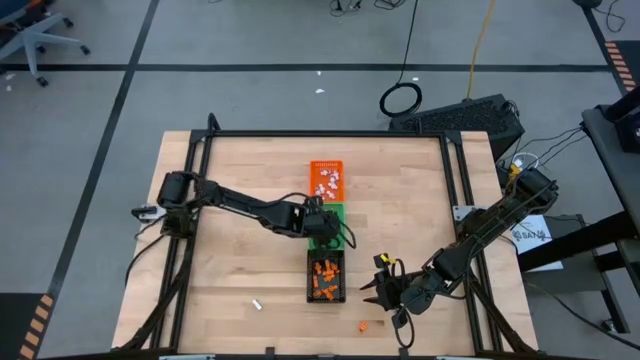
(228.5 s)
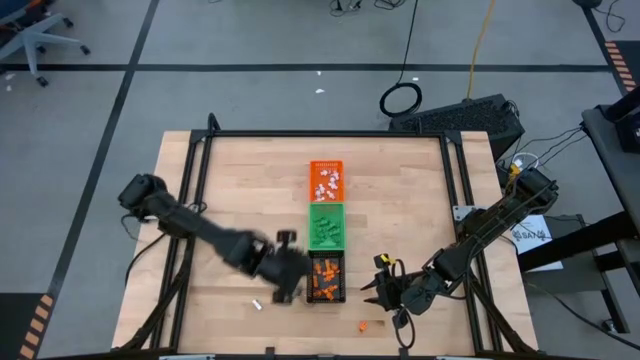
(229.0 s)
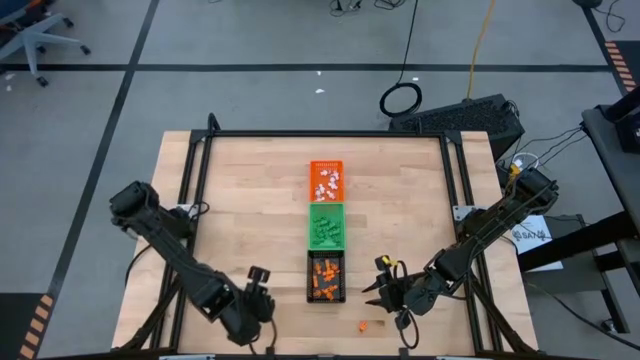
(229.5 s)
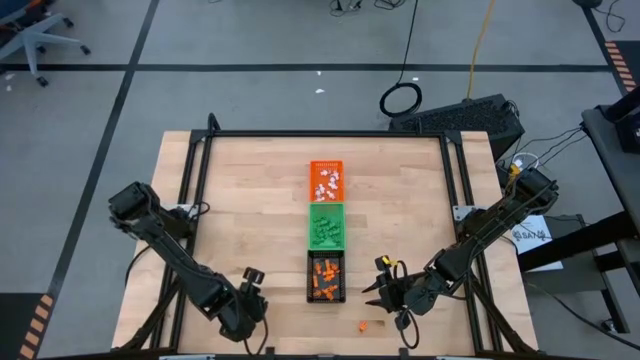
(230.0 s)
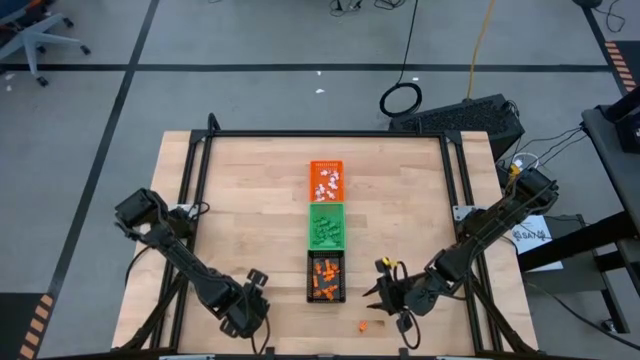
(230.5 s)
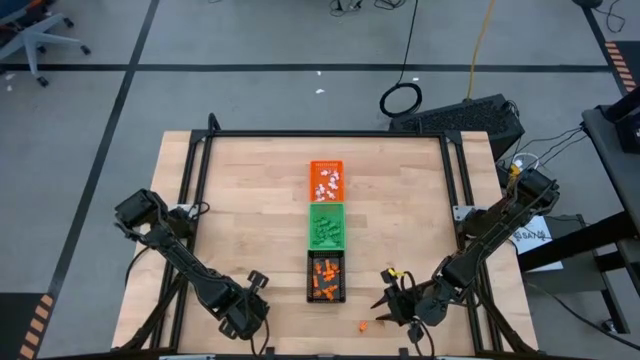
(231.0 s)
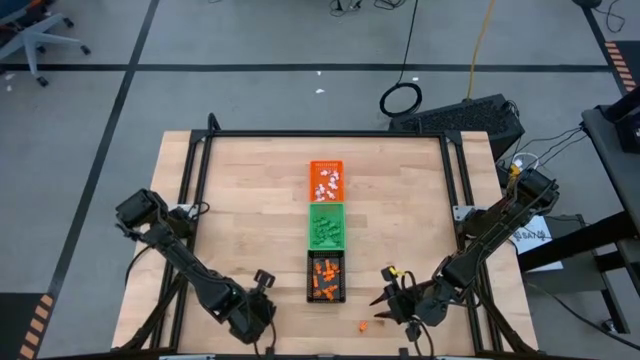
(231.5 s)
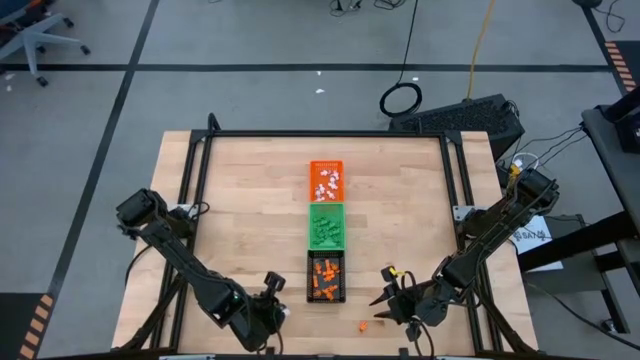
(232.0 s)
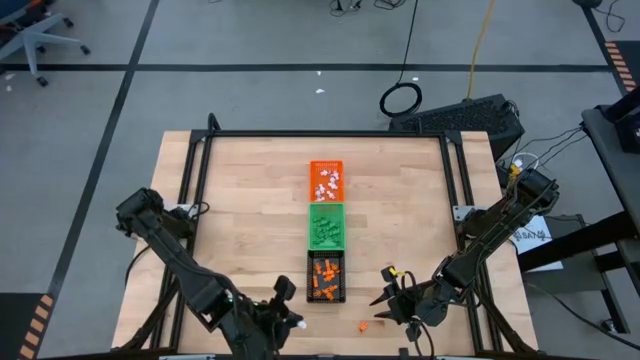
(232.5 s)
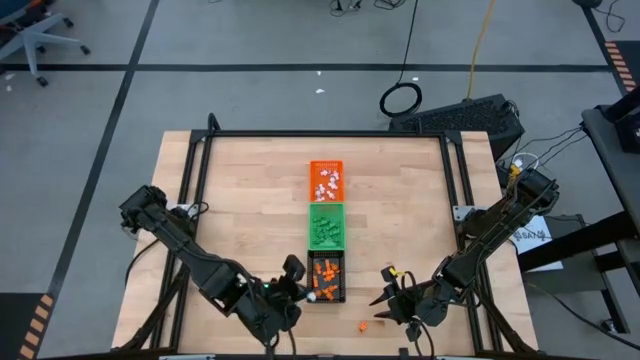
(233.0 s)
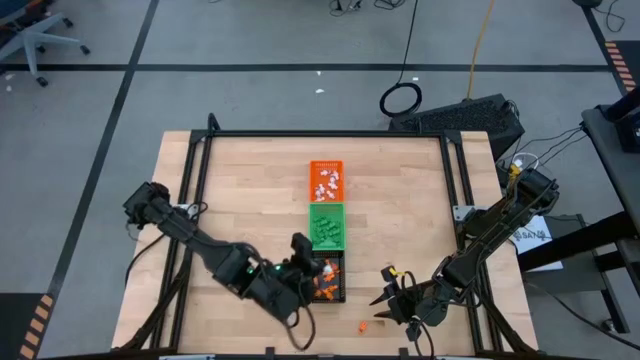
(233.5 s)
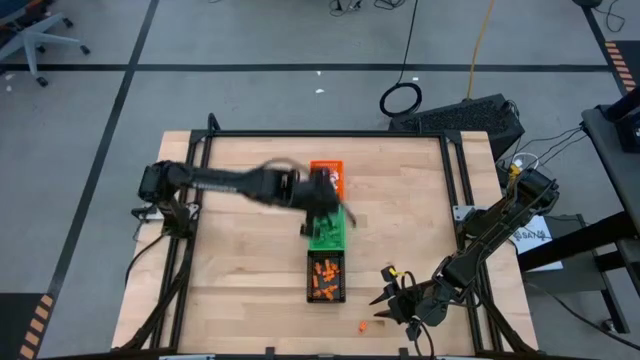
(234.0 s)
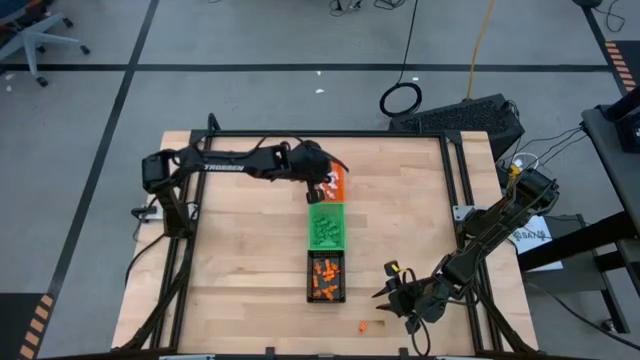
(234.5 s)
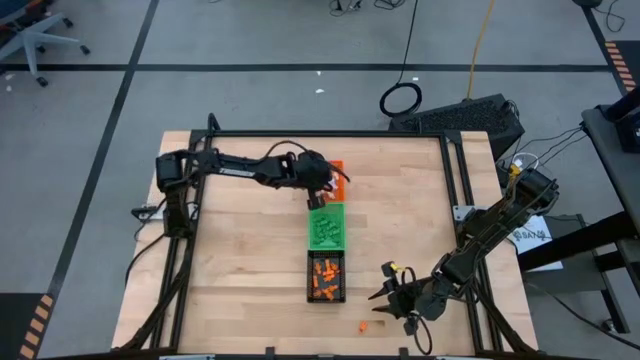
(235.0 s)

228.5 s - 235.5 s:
Task: Sort Halloween decoration
Put the white skeleton toy into the orange bin

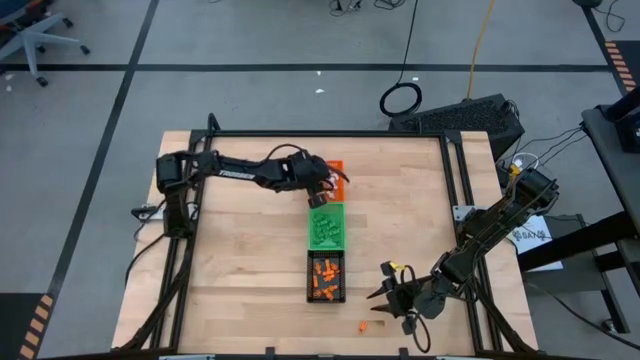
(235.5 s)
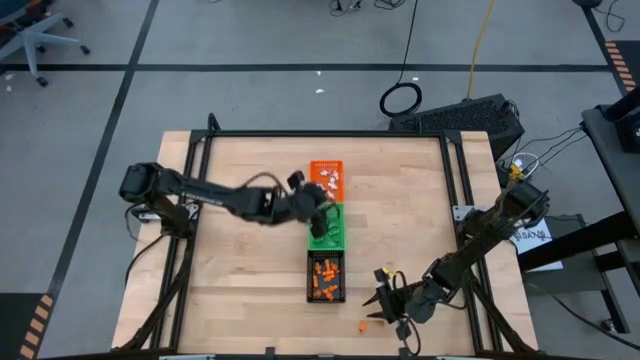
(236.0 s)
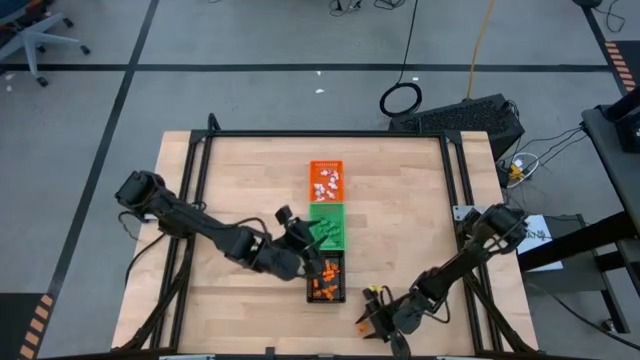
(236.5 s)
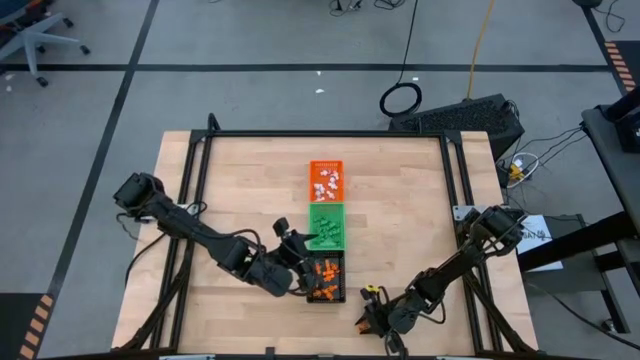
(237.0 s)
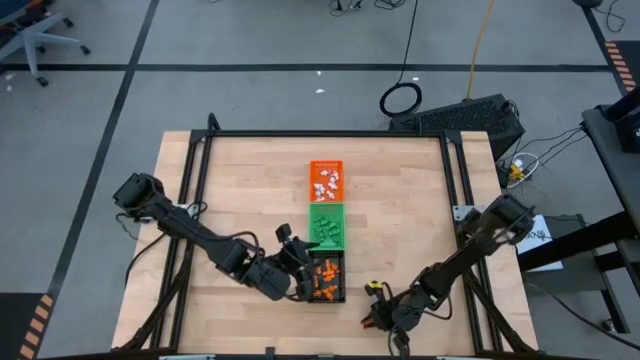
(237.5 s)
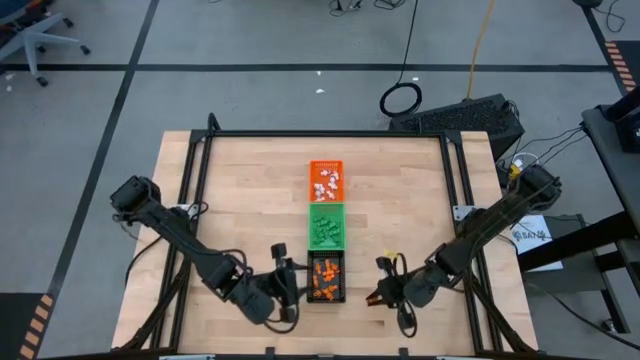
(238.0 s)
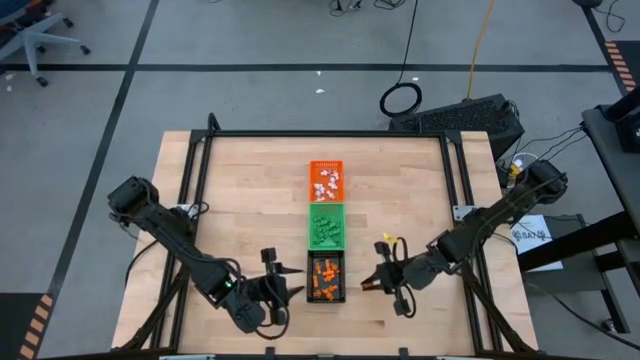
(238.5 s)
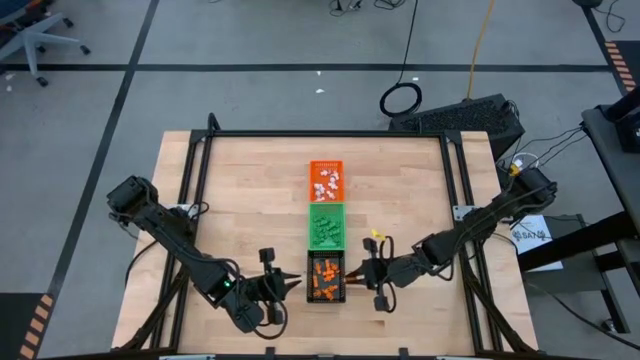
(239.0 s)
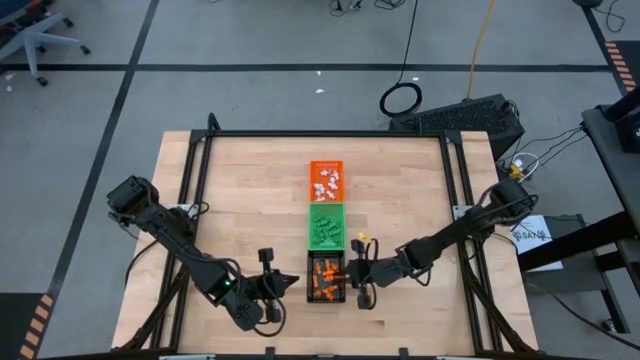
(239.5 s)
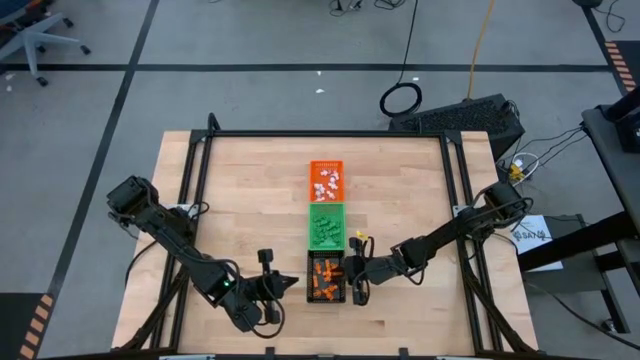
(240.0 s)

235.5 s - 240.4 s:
Put the orange skeleton toy into the black bin

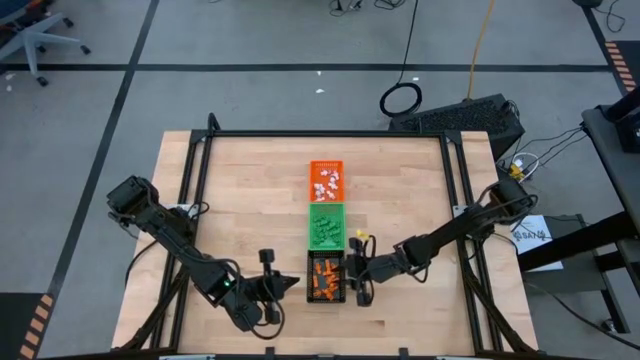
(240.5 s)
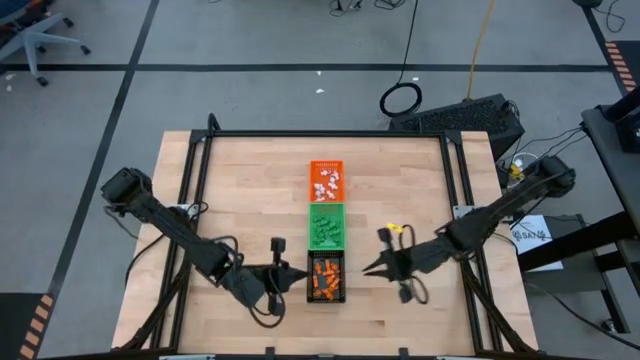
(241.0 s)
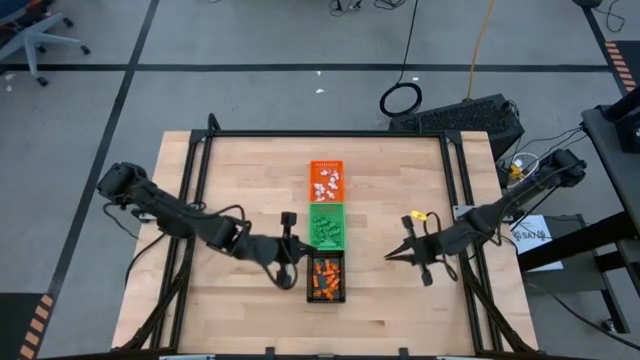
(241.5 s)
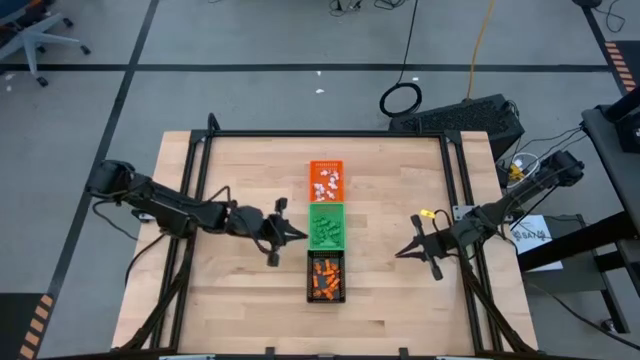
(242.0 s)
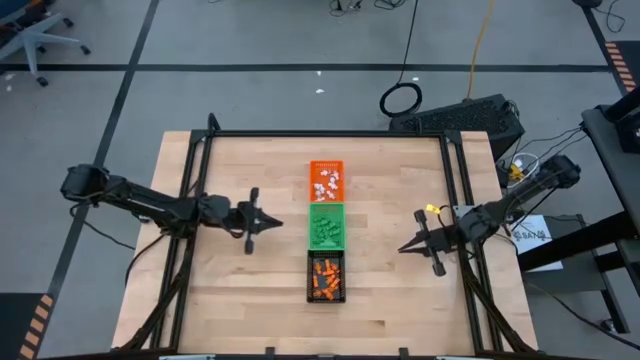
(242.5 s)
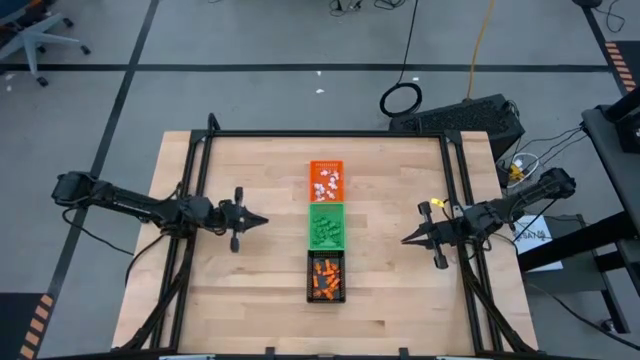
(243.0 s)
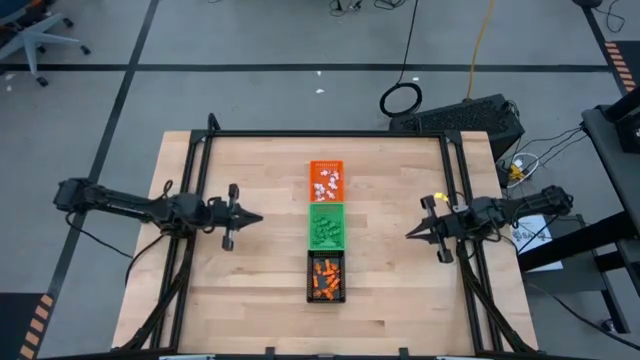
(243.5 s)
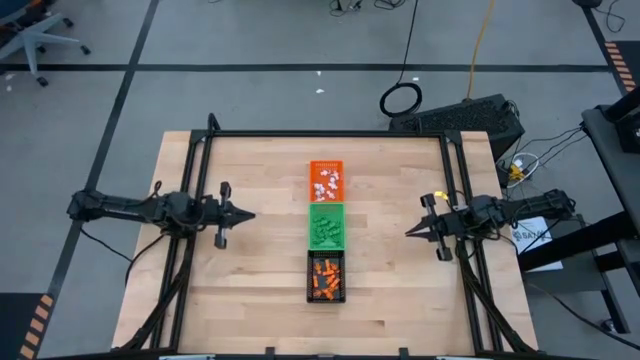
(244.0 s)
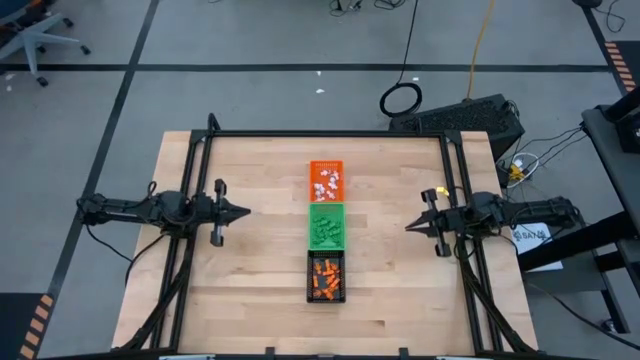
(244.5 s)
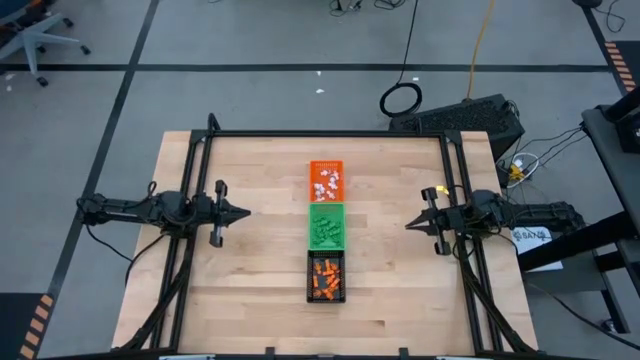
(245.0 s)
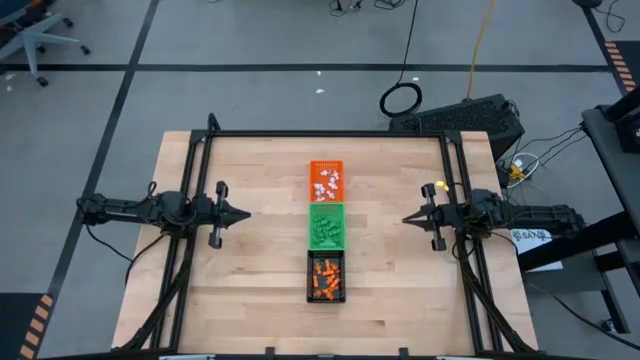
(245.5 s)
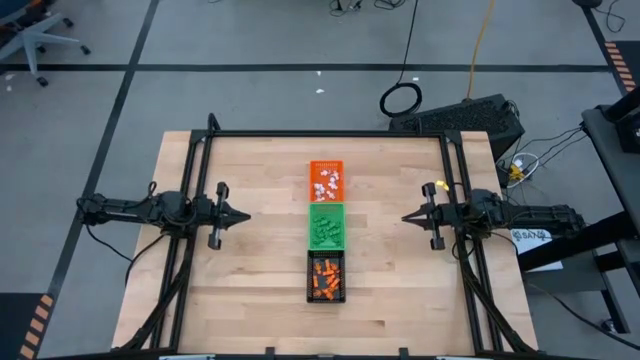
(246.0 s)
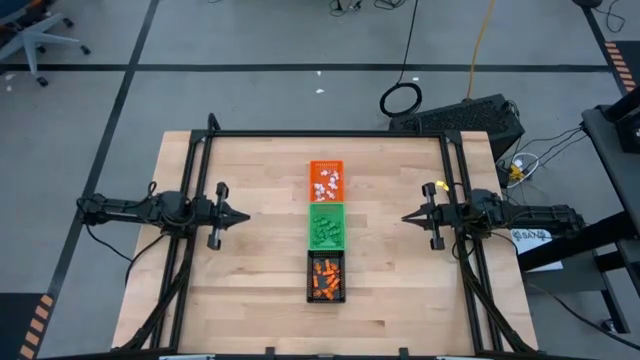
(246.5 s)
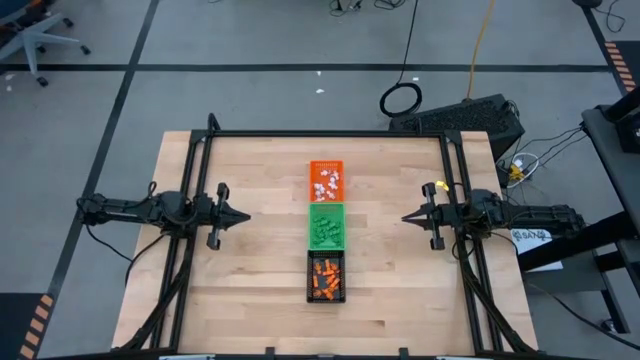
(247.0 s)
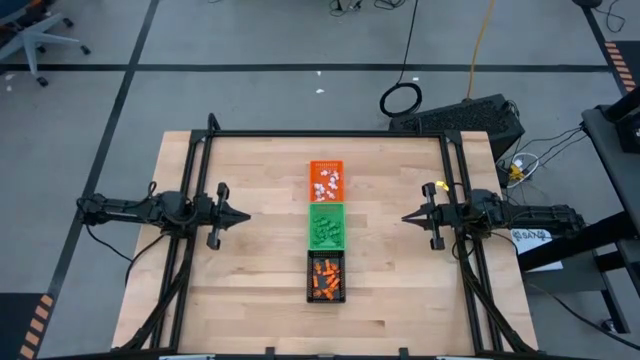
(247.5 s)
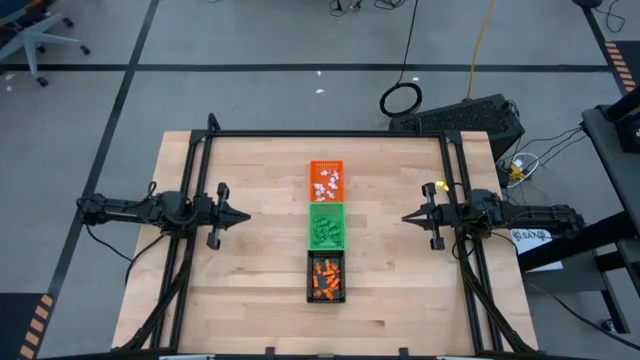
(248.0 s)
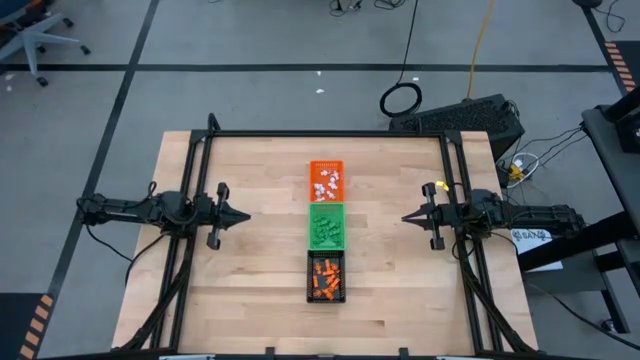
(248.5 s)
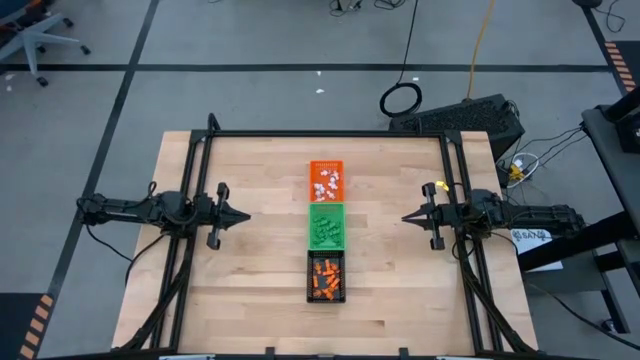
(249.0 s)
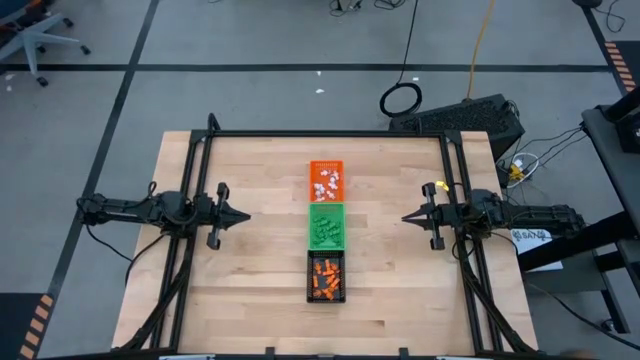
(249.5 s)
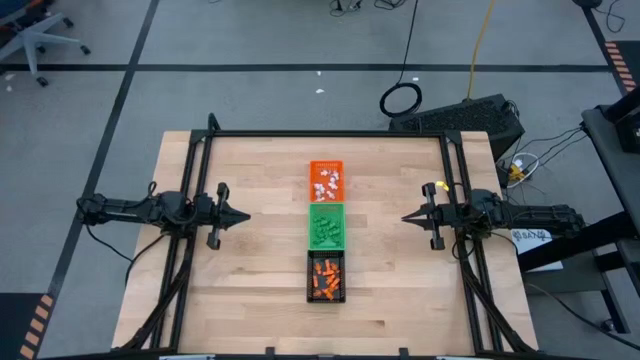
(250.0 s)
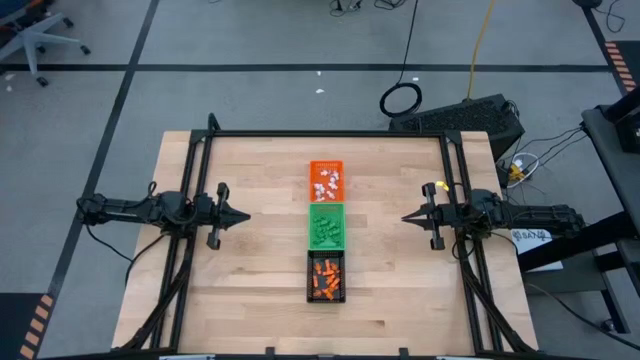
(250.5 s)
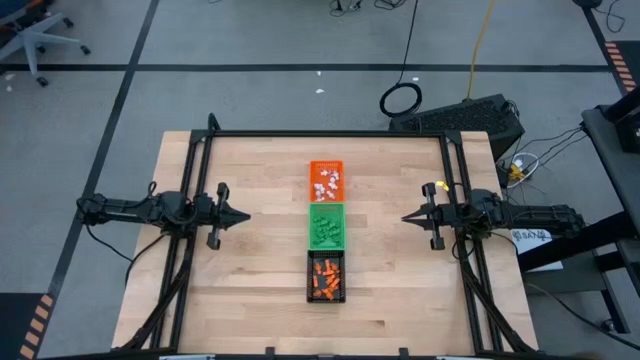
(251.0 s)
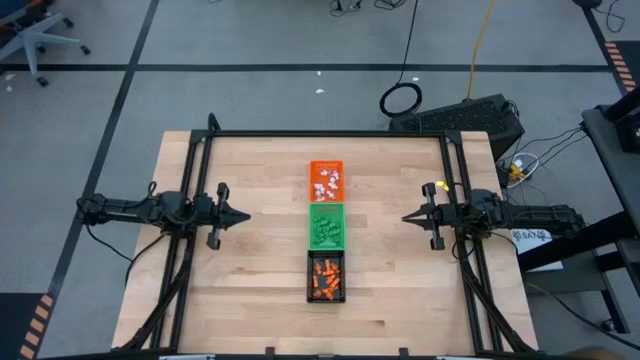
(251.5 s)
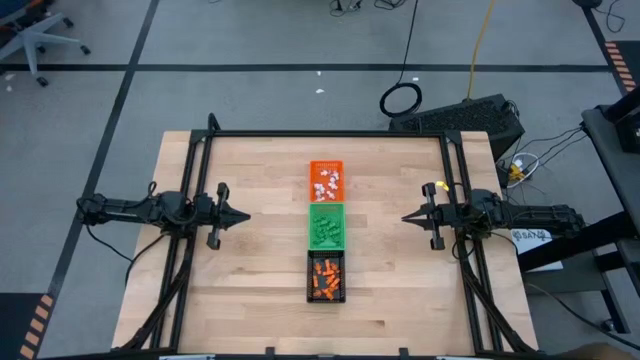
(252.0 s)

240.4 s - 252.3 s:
Return to Home Position
